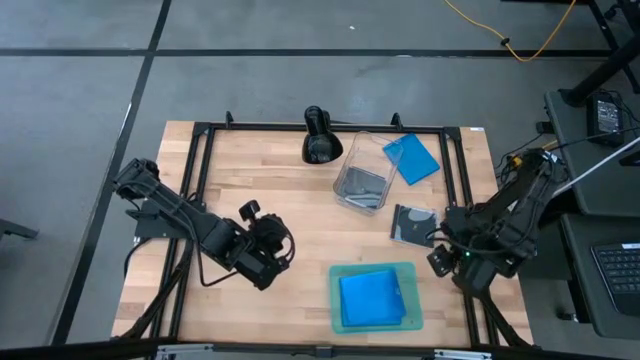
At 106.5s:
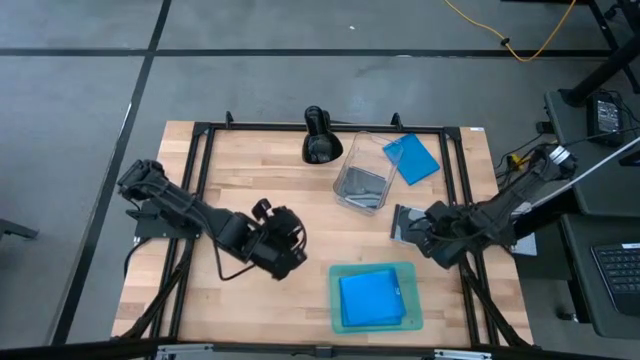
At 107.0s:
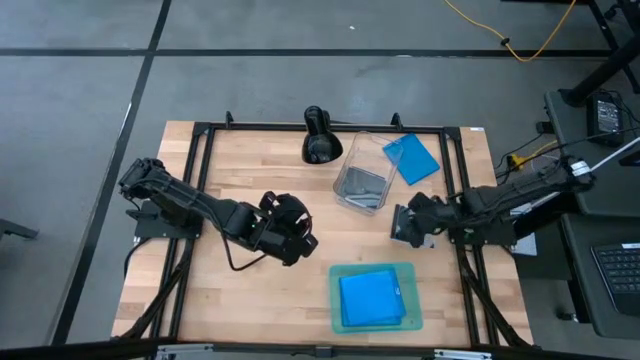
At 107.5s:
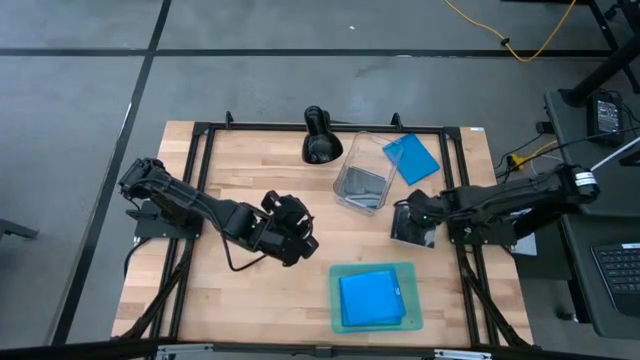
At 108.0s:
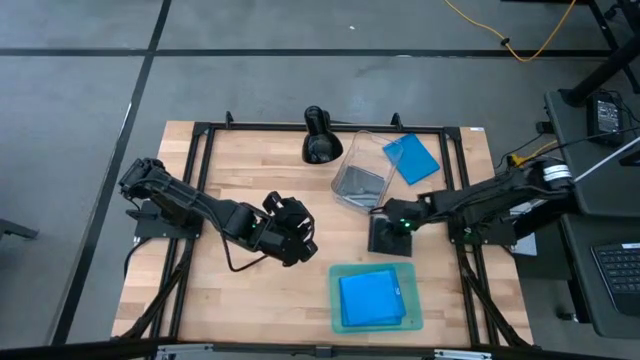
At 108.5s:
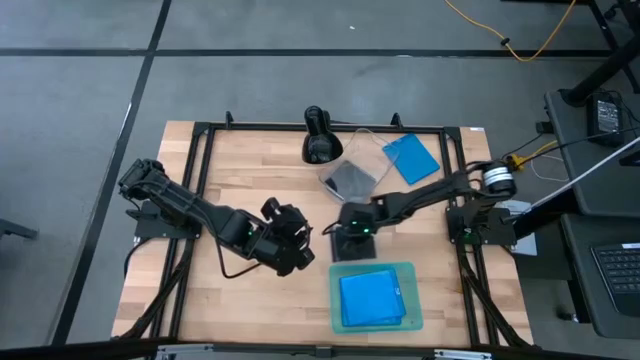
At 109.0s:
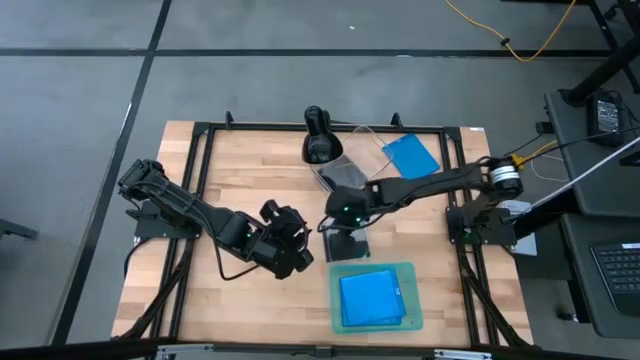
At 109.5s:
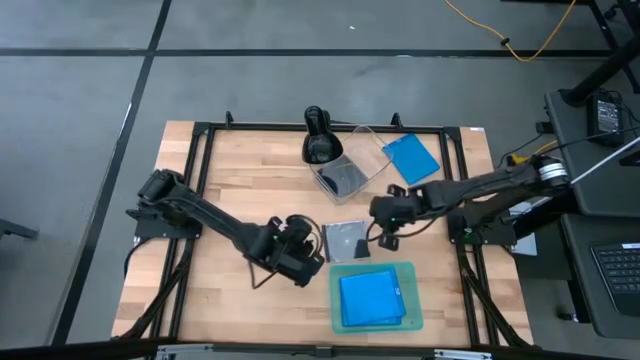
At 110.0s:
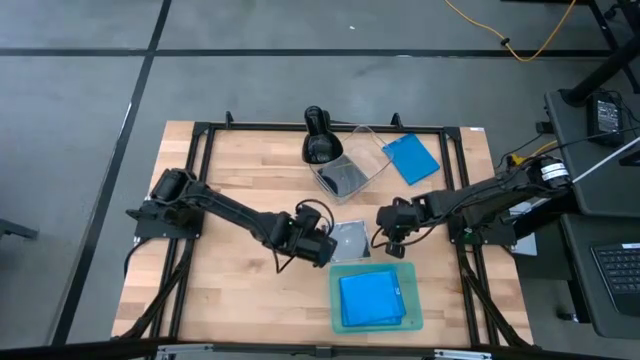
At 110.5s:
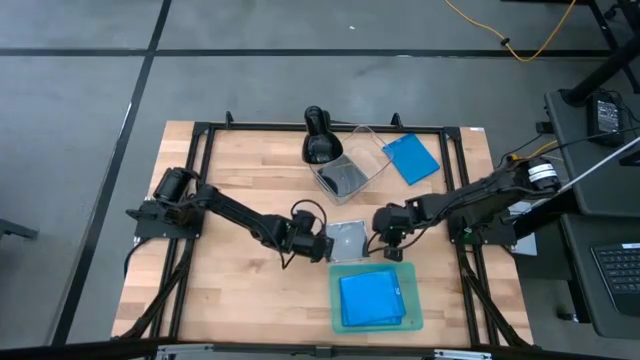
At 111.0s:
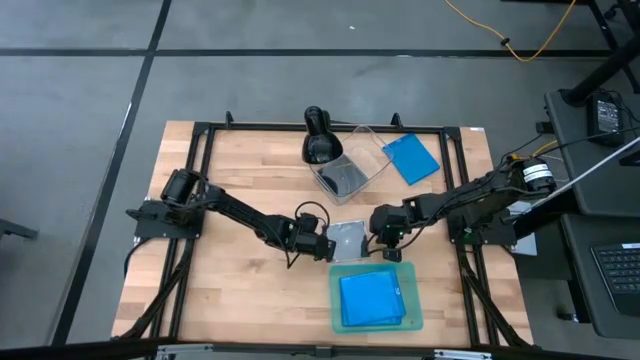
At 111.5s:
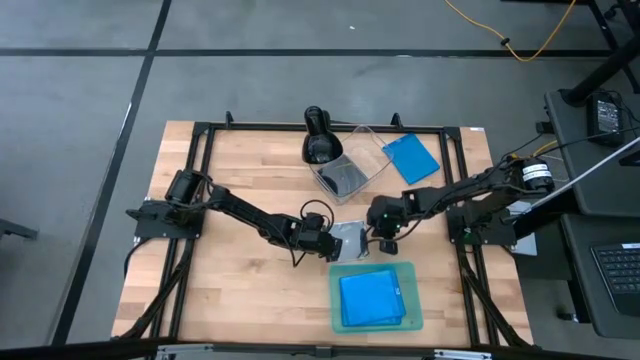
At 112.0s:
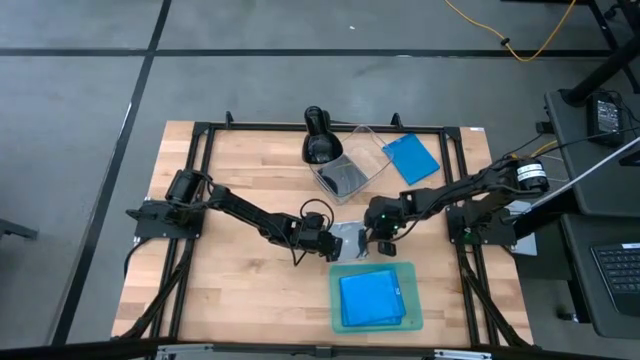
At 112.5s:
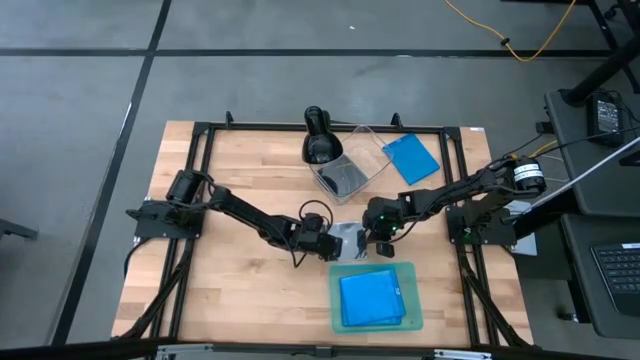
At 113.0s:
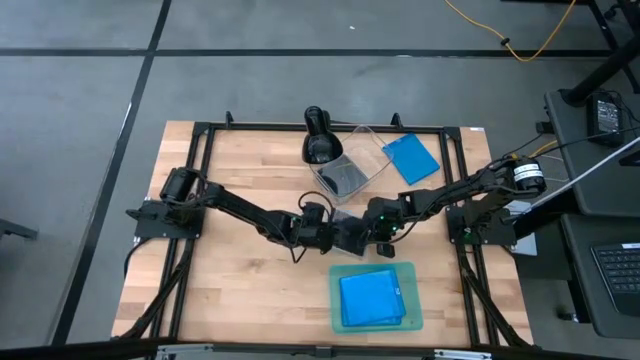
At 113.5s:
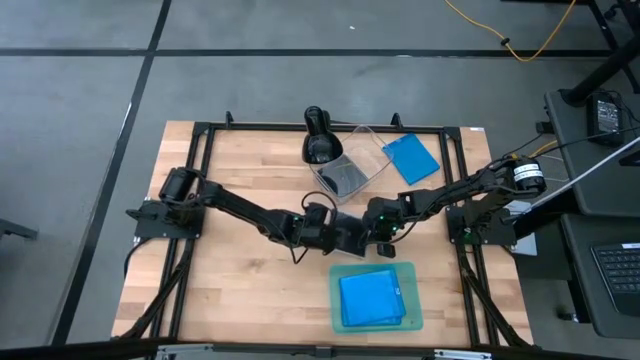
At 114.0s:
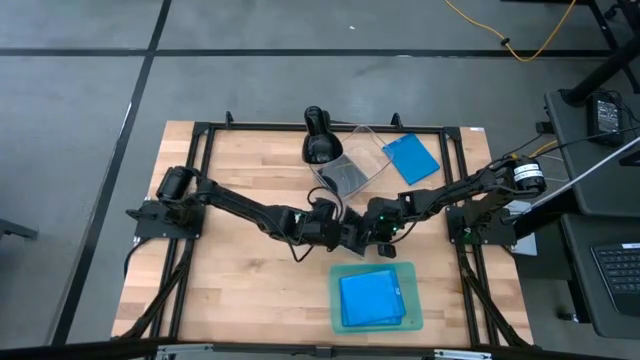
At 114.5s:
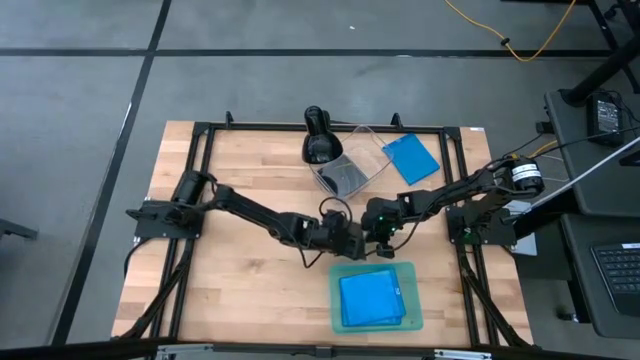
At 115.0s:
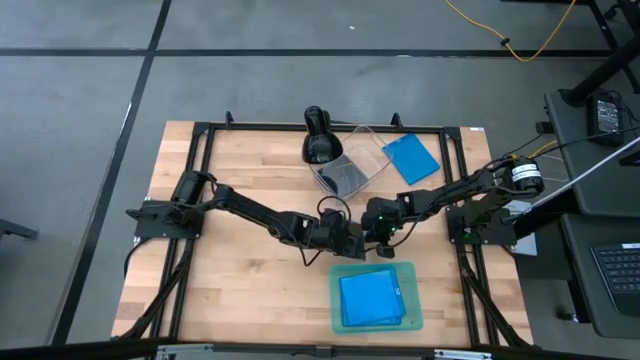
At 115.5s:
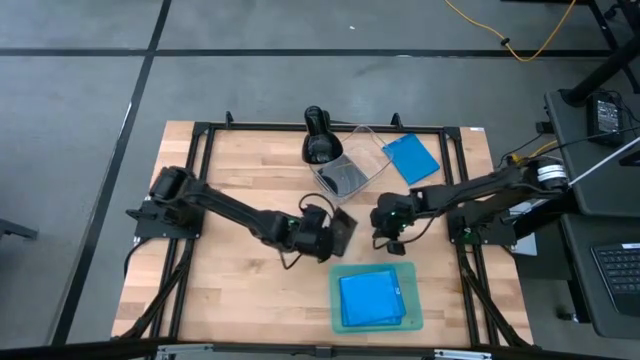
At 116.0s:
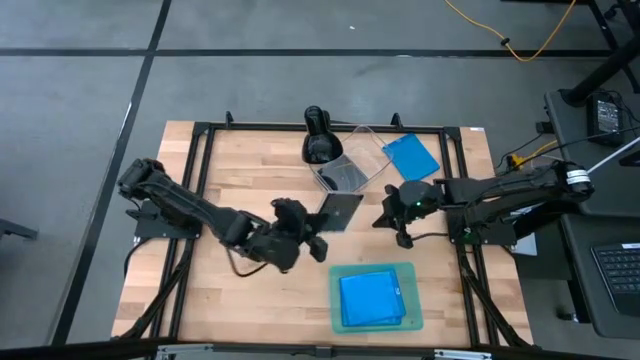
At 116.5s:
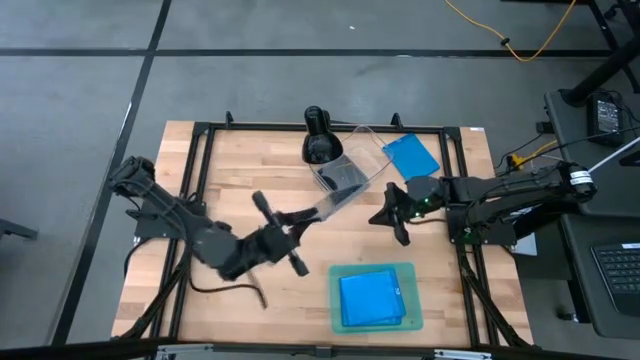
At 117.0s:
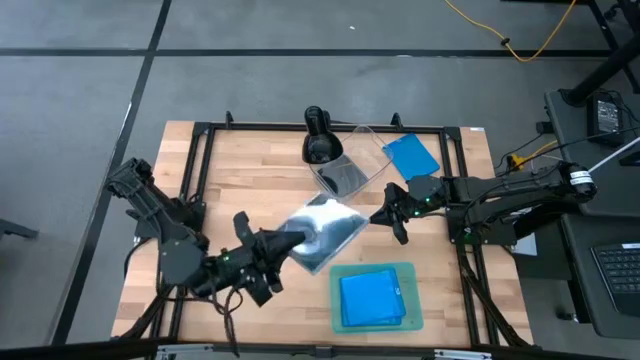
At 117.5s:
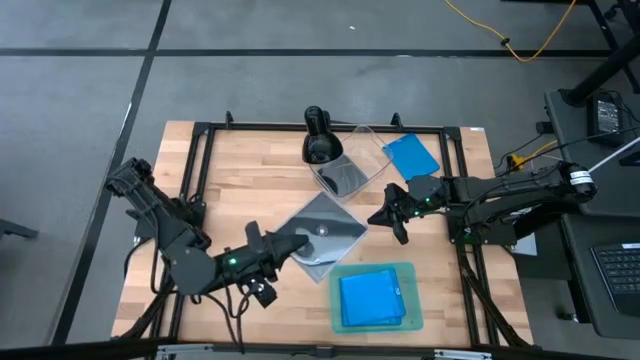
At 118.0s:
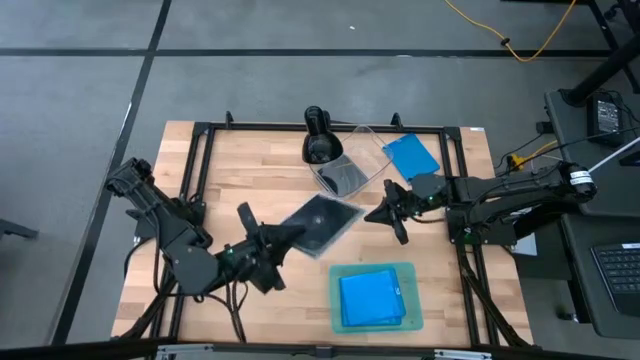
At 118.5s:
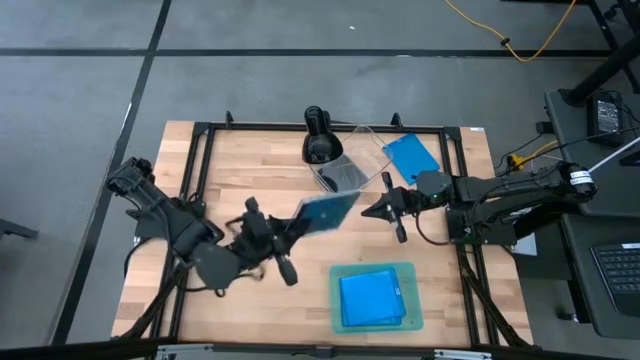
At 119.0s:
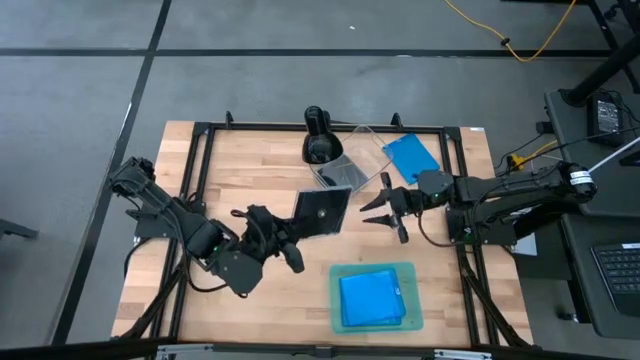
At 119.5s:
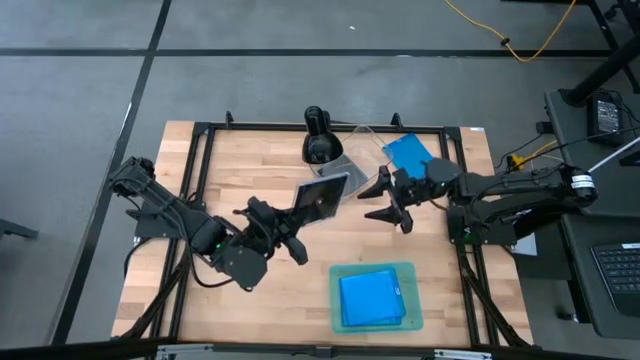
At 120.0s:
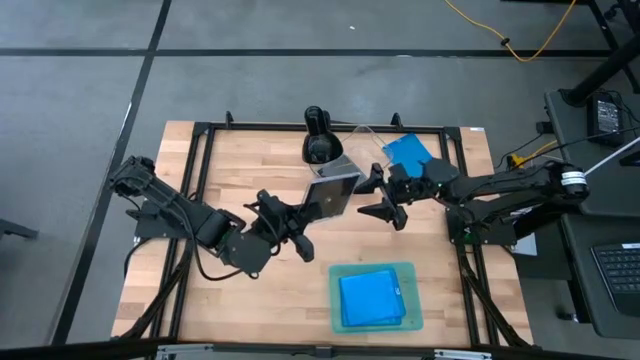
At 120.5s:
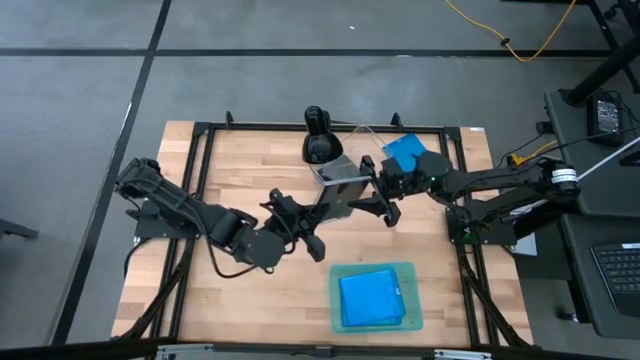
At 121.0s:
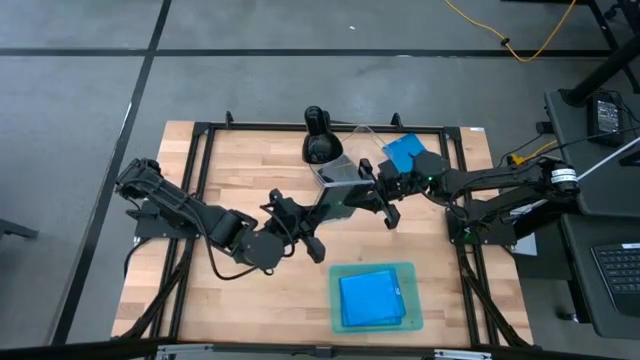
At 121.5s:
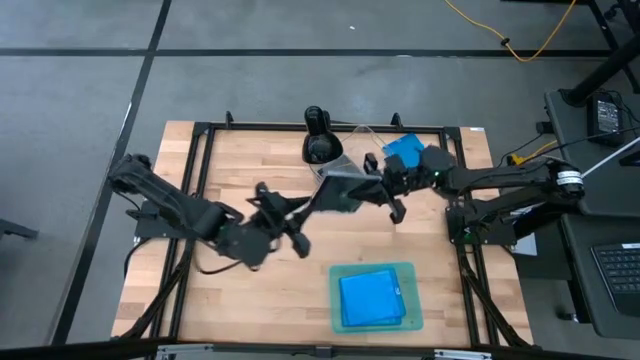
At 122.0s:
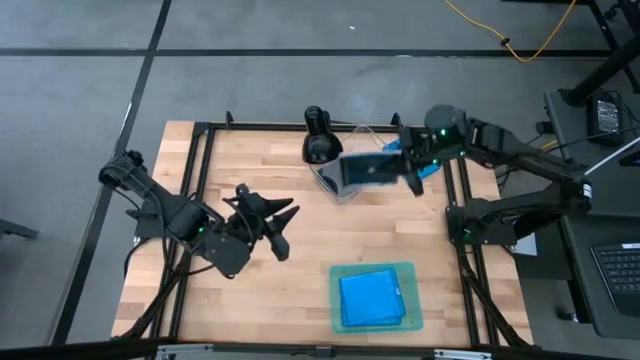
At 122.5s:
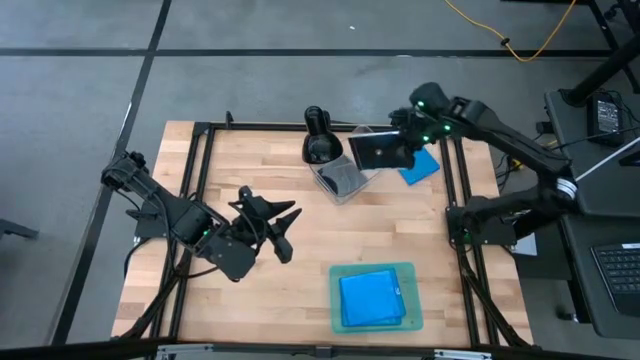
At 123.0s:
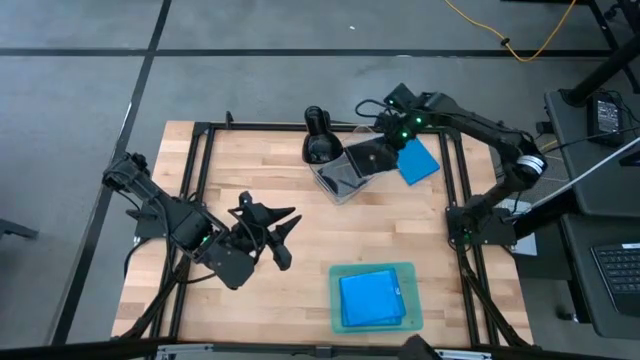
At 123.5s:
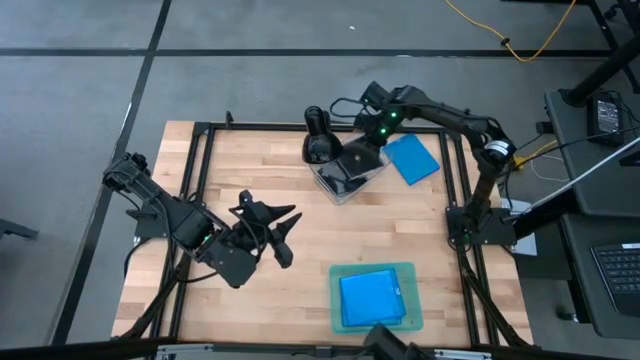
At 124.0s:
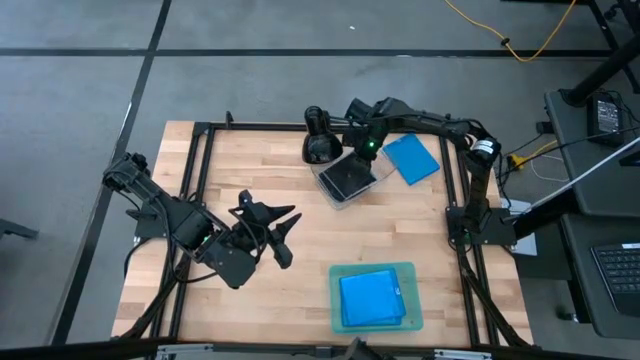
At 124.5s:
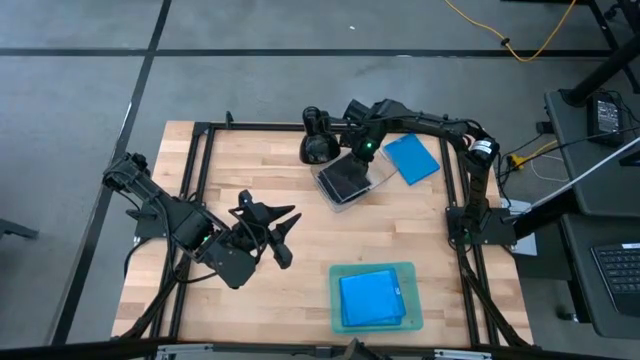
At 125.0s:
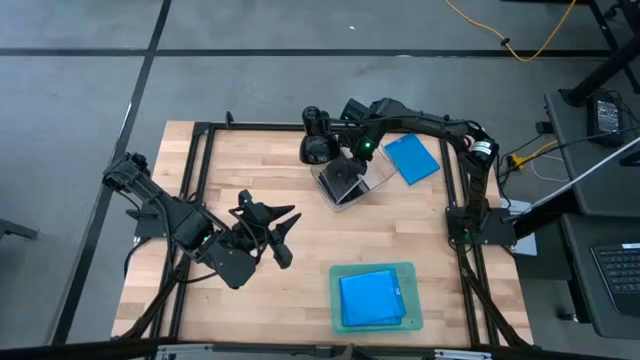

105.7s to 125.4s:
Task: Pick & place jewel cases by type
Put the black CD case into the transparent bin

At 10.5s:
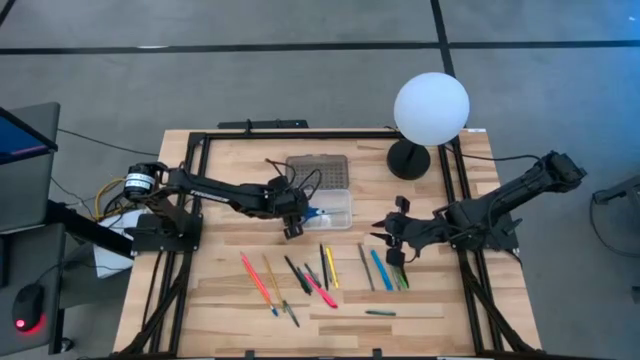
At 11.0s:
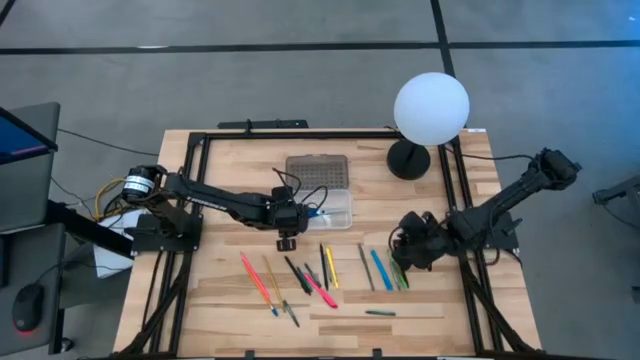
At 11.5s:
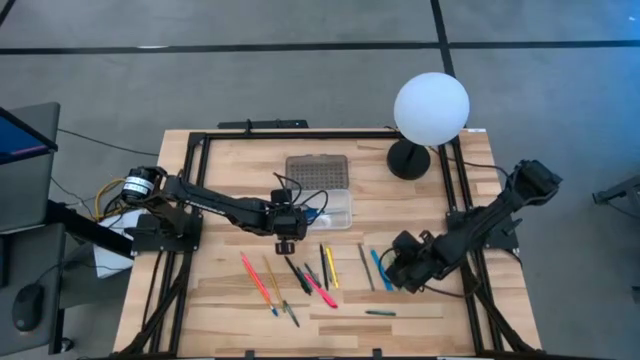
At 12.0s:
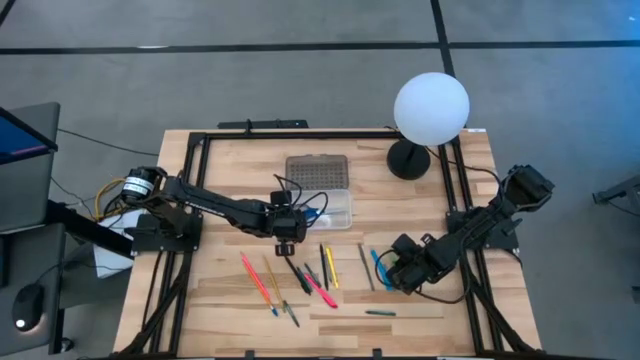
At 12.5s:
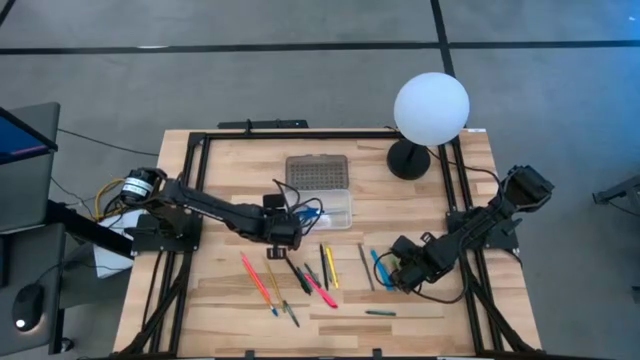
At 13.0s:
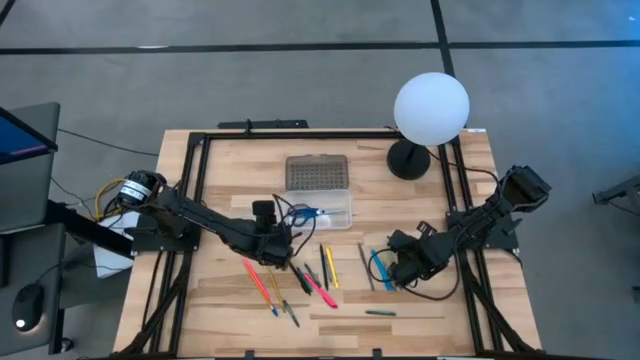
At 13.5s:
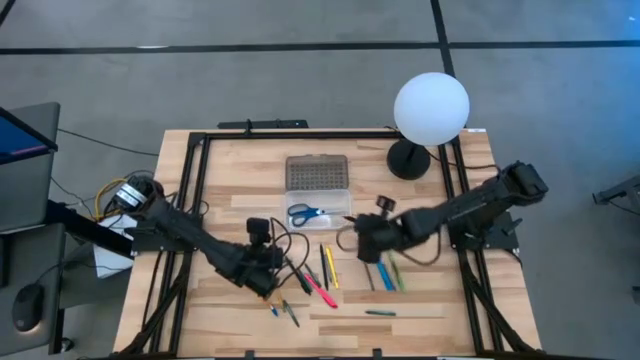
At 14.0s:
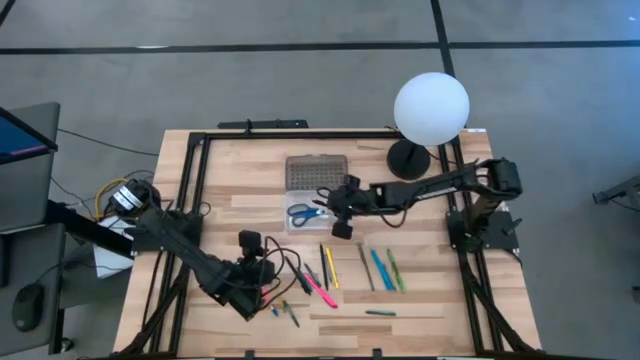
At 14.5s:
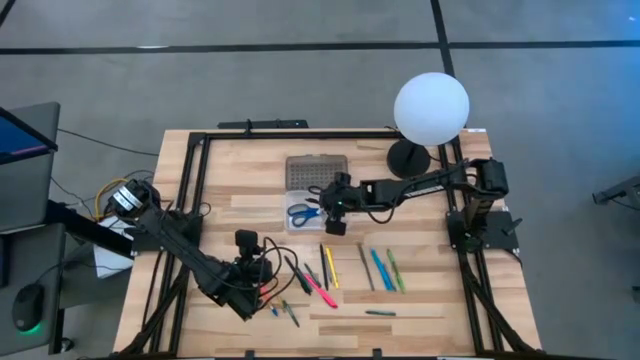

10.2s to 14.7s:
Task: Pick & place school supplies into a supply box
Put the black pen into the gray supply box
